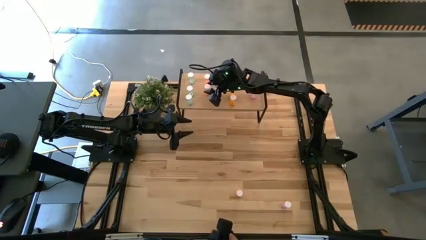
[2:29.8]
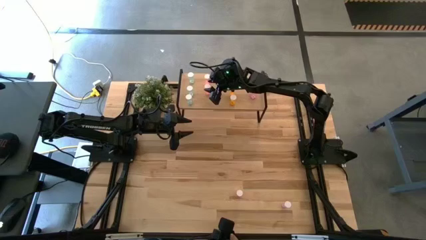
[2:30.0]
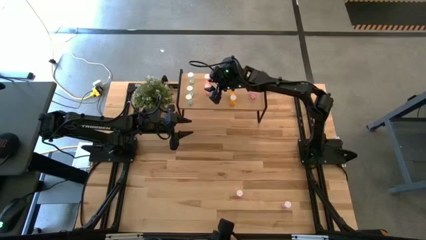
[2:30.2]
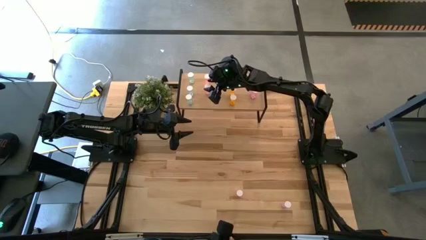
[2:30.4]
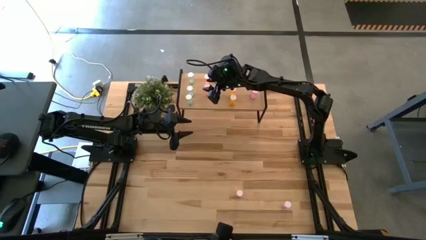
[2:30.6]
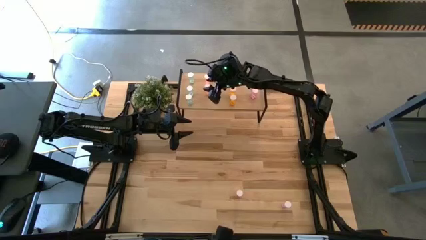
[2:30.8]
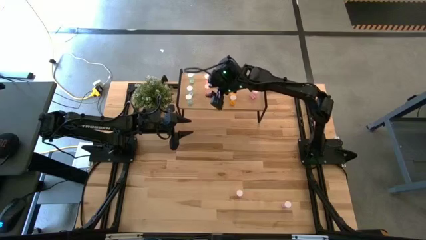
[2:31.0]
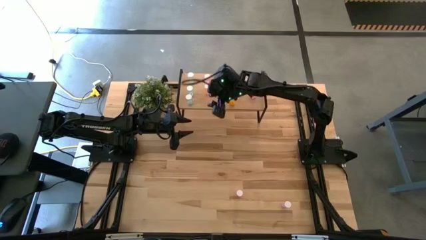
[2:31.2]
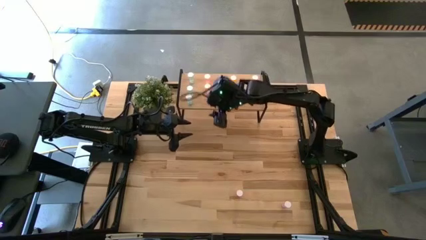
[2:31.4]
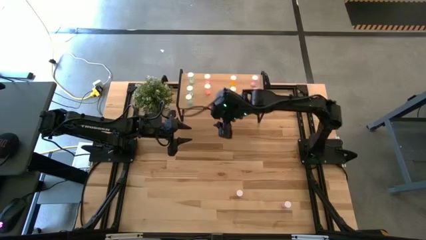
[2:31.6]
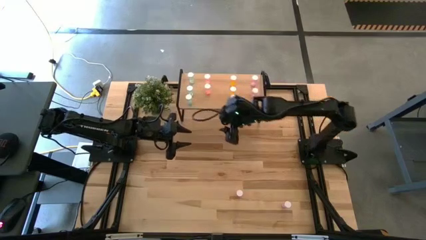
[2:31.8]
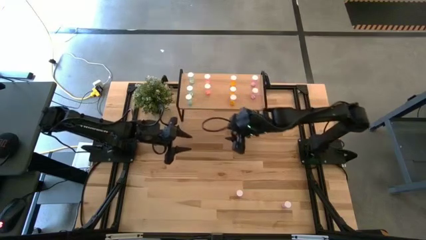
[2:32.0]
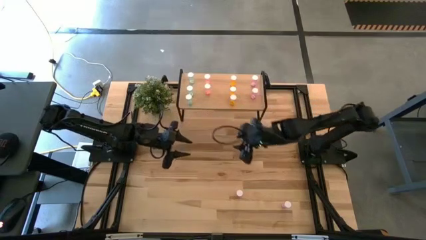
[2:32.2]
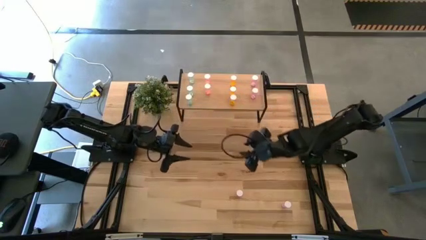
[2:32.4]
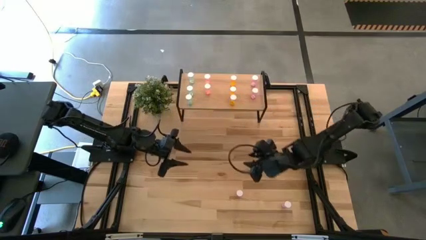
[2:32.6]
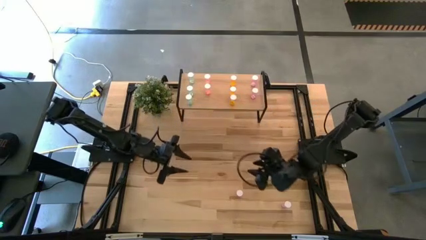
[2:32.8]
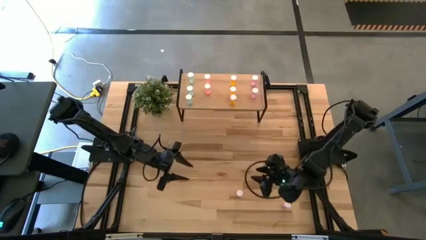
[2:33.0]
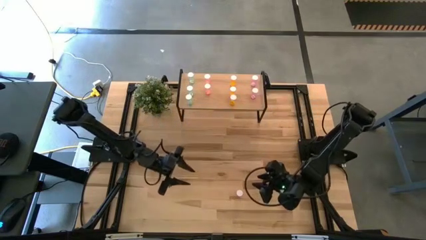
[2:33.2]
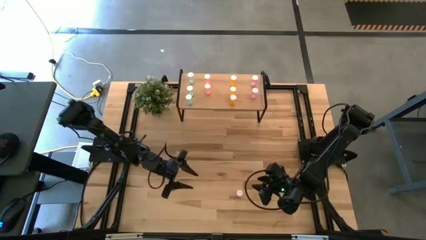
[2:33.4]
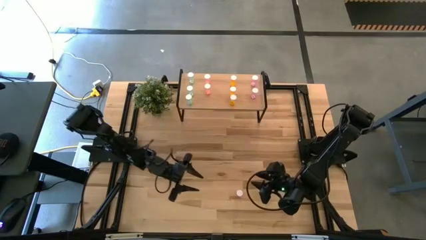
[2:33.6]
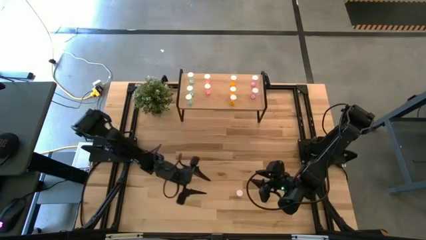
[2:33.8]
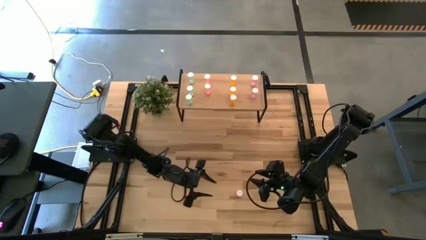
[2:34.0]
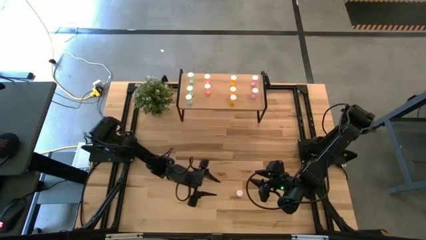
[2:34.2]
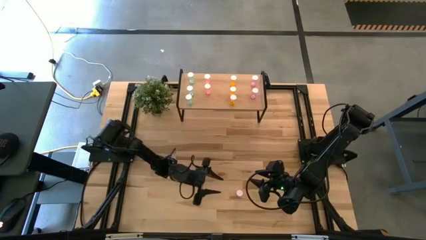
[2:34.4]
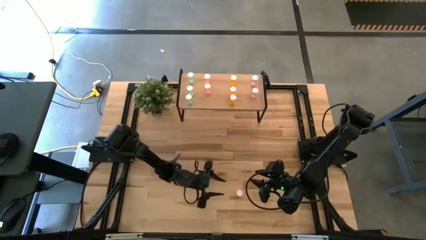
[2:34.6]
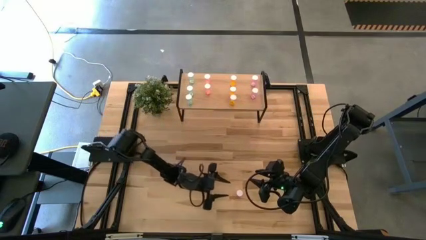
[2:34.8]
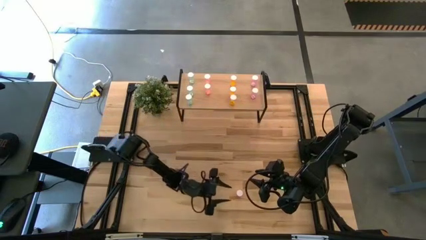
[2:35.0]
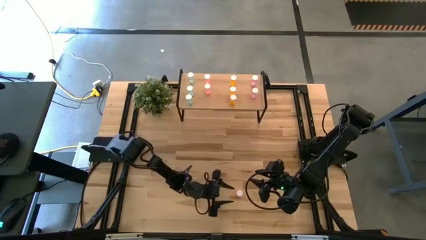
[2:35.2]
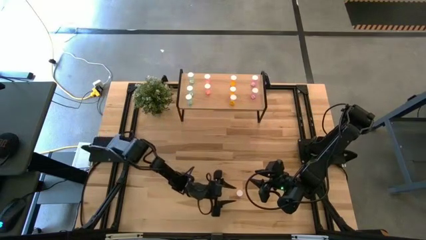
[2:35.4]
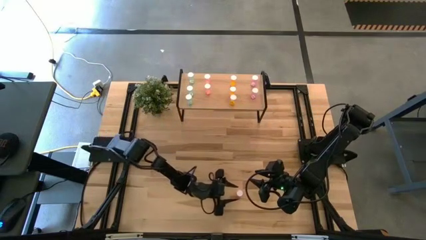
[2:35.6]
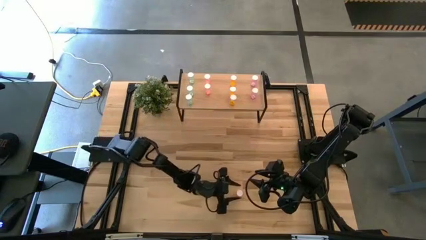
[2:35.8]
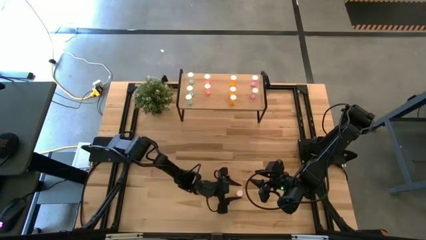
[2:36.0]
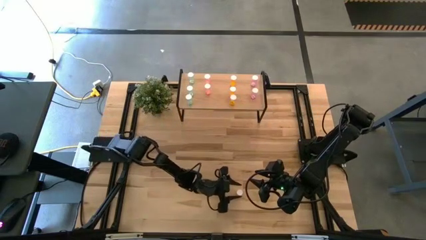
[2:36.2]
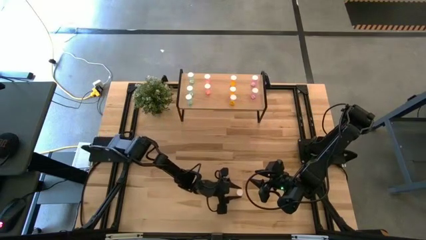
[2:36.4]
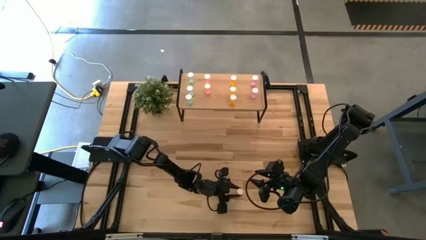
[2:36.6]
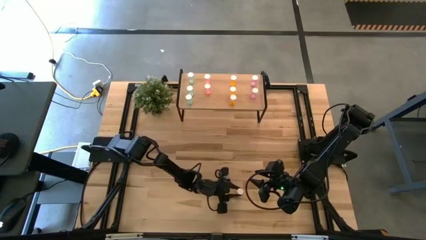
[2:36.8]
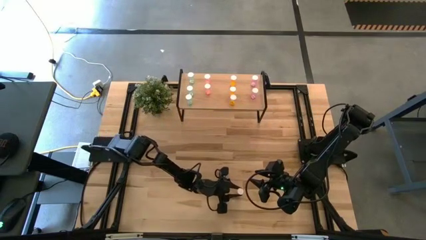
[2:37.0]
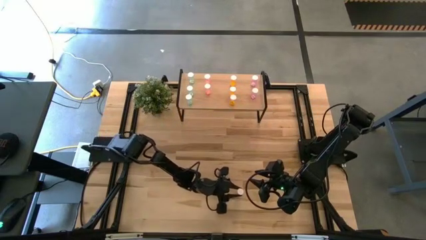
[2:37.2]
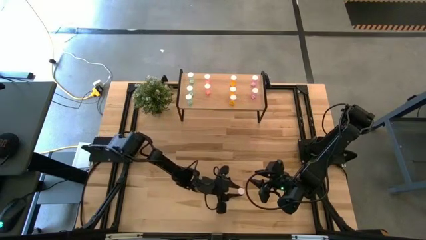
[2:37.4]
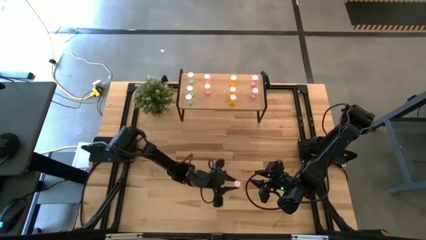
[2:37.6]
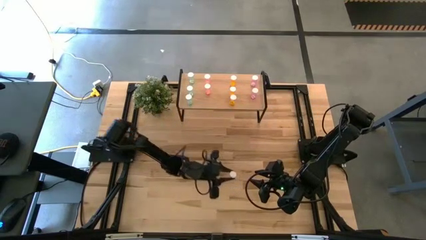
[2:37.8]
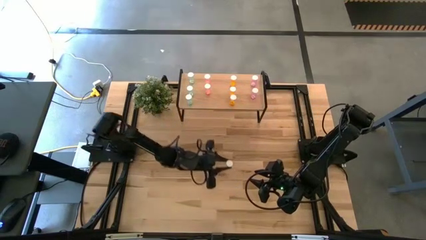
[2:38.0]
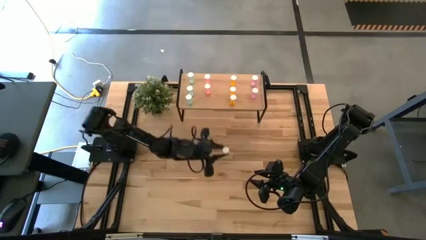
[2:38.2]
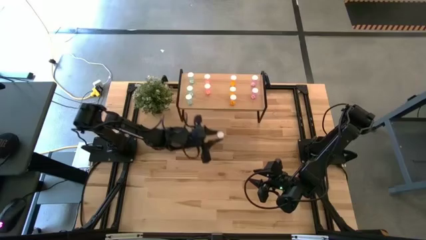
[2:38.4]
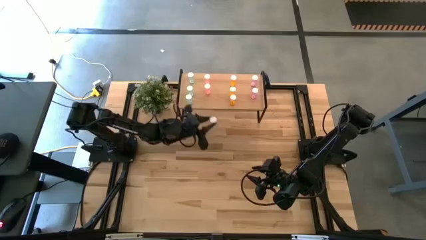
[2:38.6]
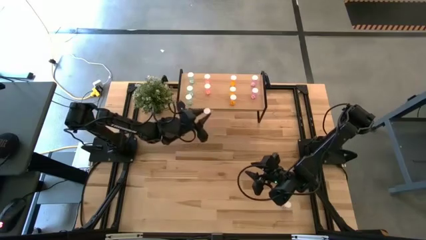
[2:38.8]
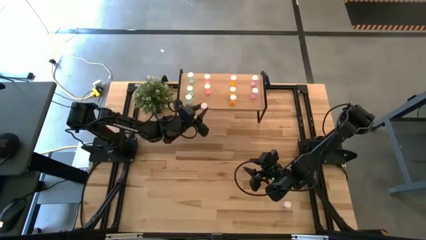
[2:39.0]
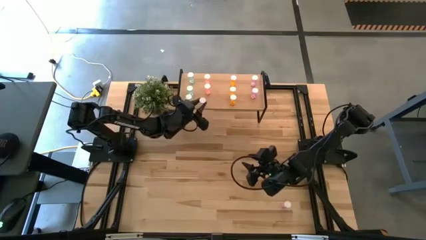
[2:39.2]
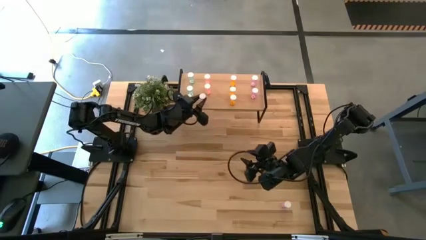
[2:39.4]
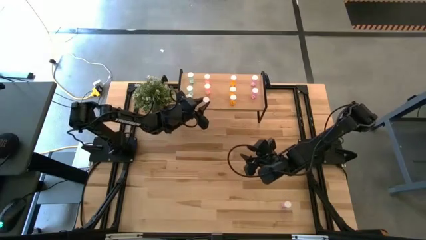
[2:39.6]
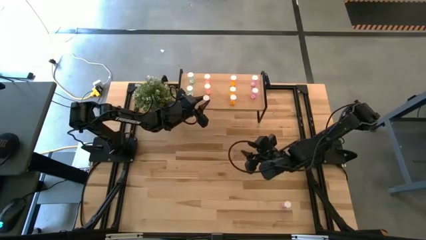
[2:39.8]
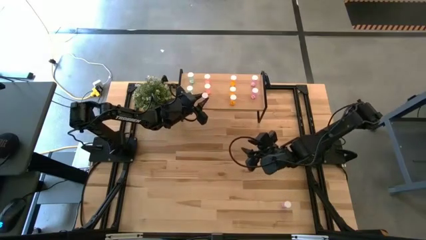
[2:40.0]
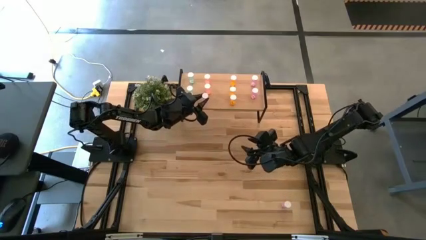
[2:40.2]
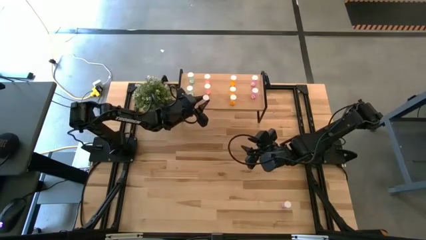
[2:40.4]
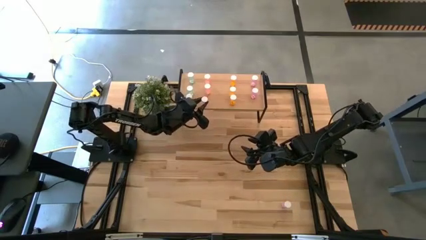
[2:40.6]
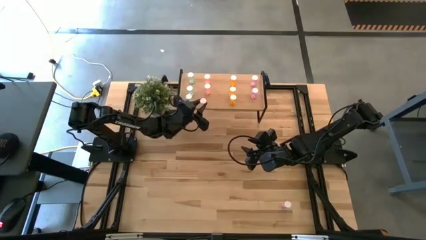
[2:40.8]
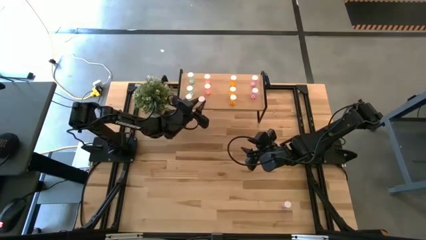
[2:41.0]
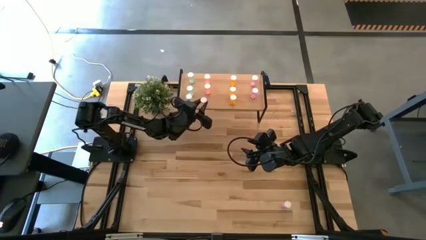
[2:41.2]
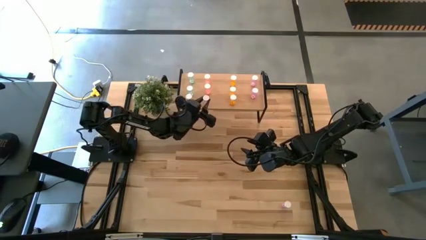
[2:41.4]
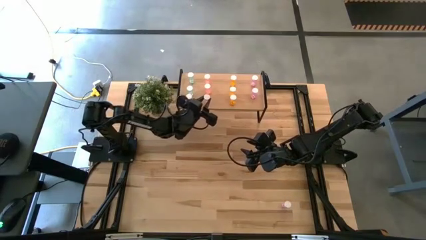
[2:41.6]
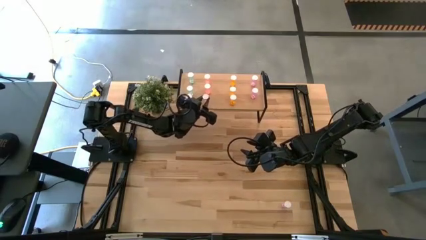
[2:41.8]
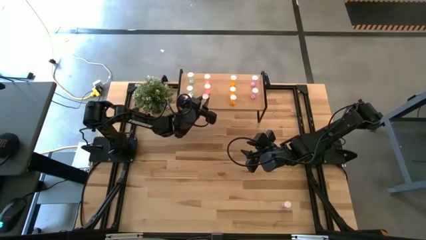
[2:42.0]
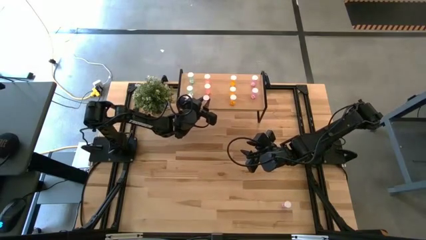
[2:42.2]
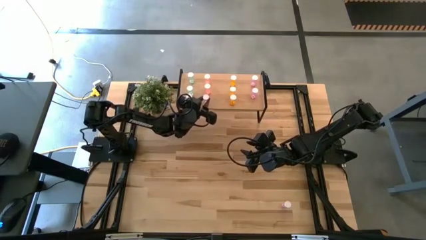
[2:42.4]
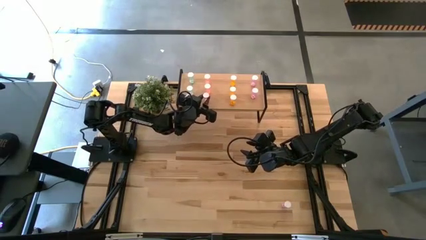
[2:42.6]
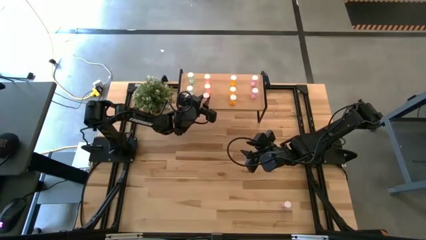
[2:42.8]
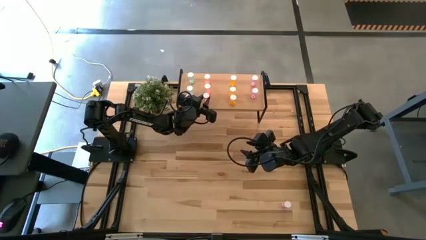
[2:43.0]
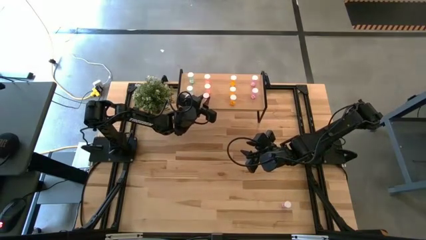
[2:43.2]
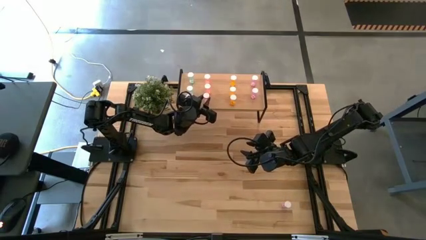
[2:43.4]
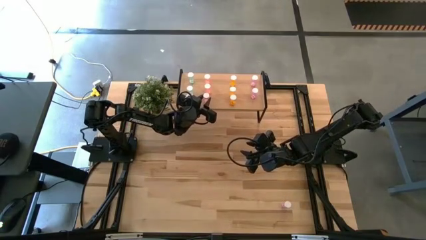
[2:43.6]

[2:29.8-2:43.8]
Task: Pick and place medicine bottles onto shelf by color
Put the pink pill bottle on the shelf aligned with the other pink pill bottles
